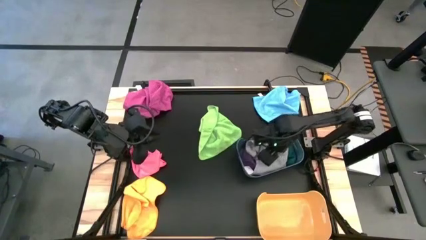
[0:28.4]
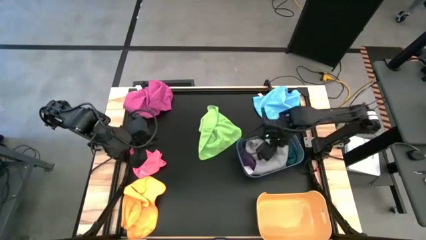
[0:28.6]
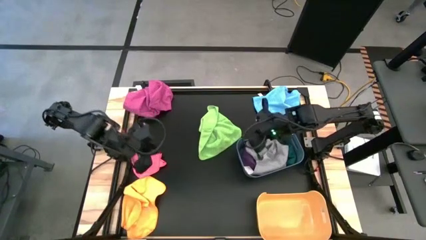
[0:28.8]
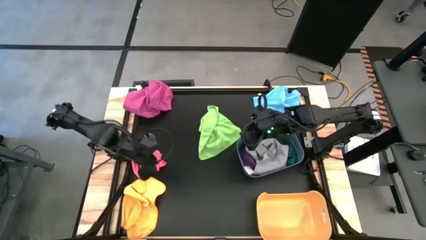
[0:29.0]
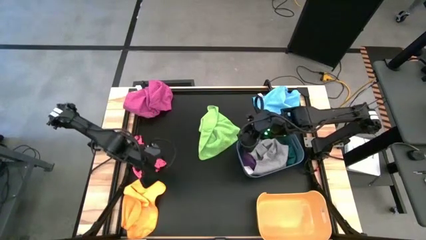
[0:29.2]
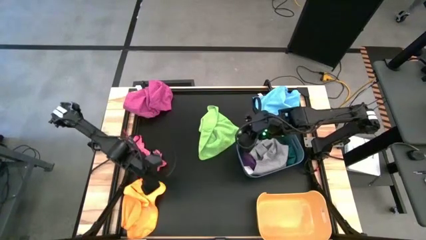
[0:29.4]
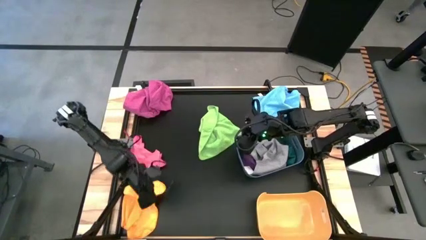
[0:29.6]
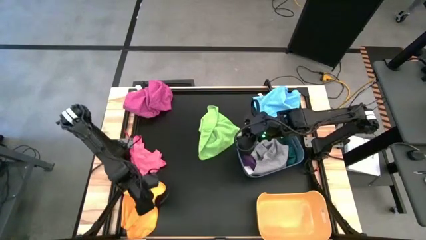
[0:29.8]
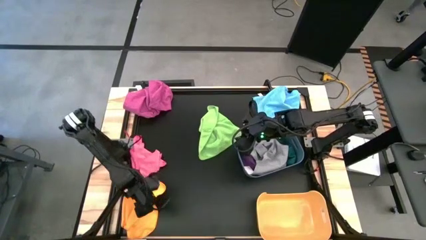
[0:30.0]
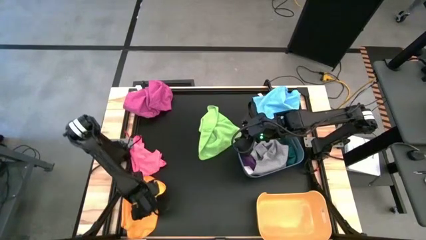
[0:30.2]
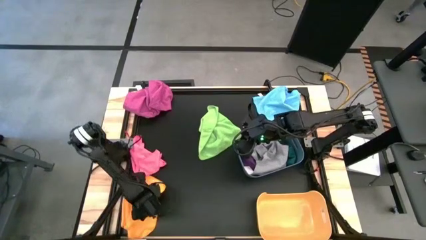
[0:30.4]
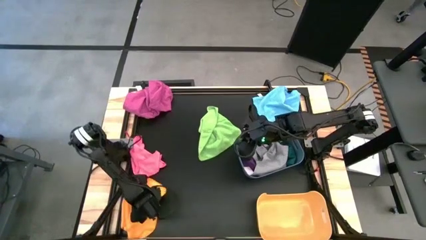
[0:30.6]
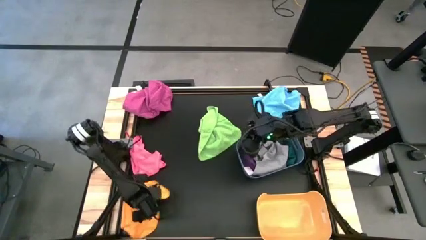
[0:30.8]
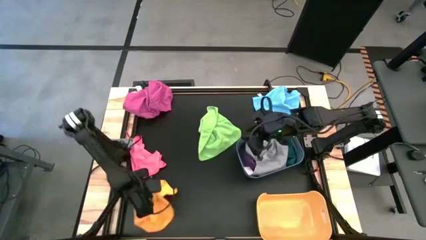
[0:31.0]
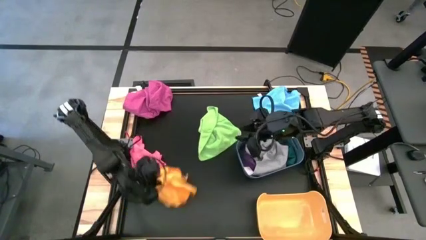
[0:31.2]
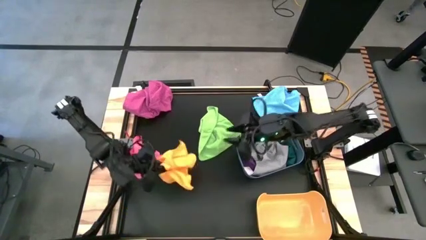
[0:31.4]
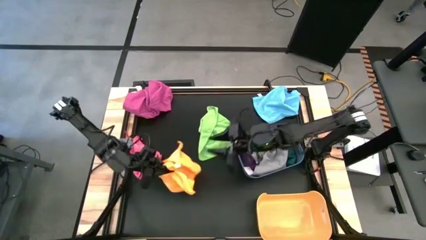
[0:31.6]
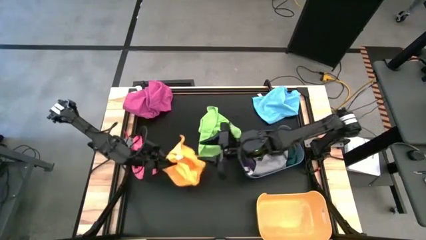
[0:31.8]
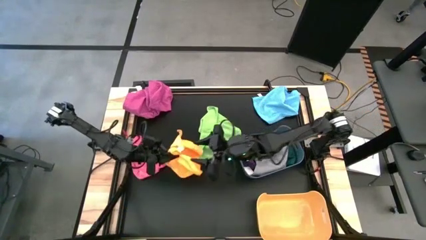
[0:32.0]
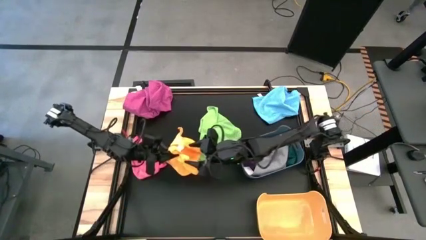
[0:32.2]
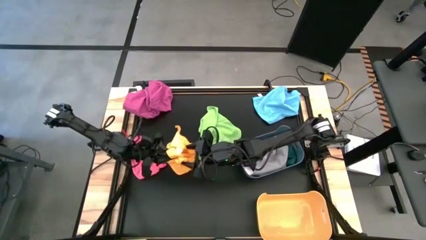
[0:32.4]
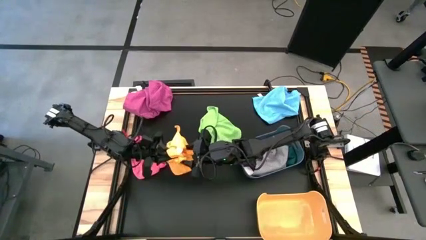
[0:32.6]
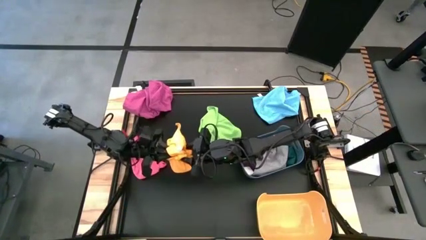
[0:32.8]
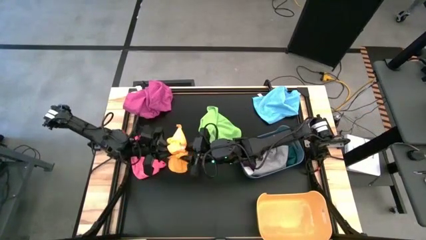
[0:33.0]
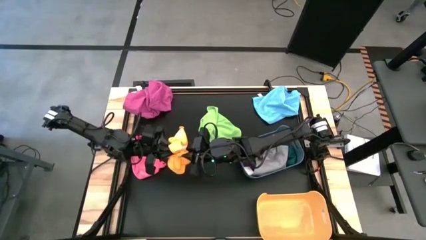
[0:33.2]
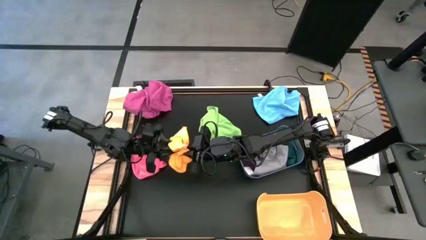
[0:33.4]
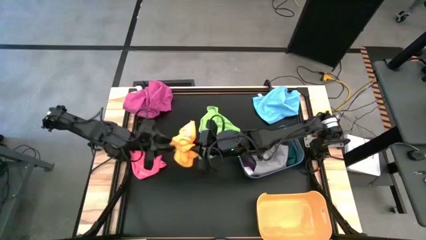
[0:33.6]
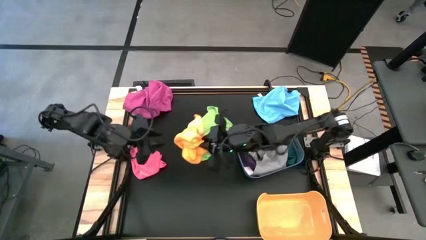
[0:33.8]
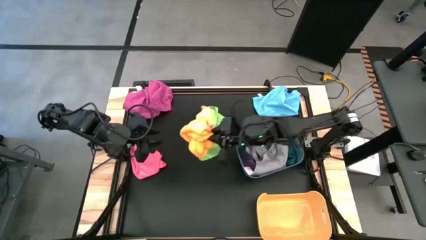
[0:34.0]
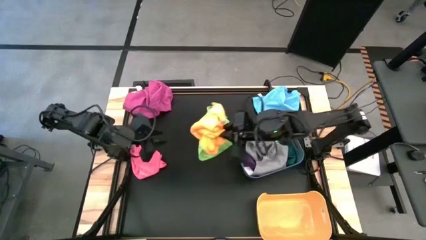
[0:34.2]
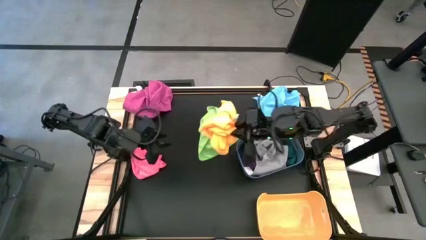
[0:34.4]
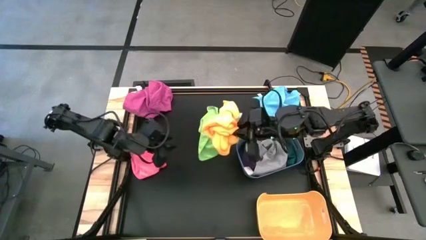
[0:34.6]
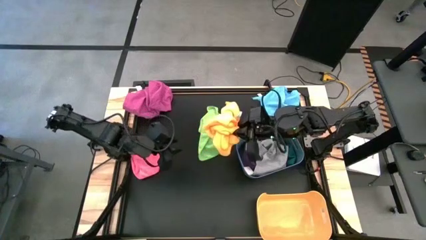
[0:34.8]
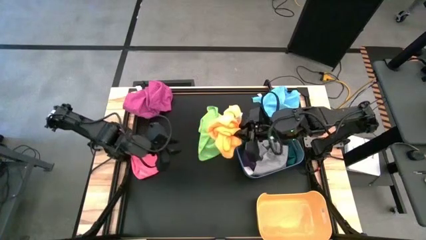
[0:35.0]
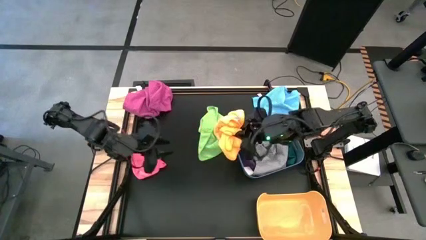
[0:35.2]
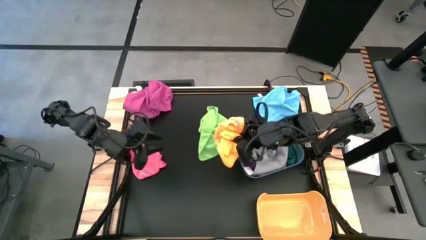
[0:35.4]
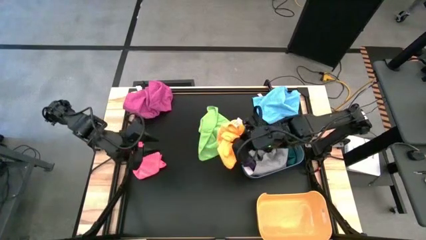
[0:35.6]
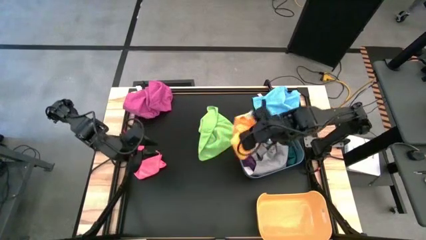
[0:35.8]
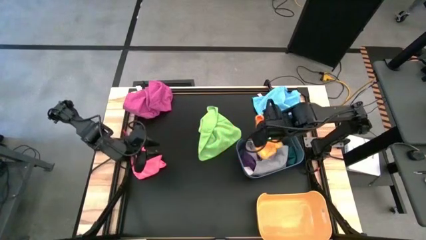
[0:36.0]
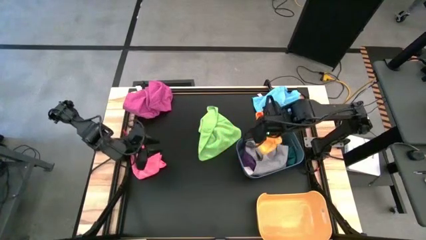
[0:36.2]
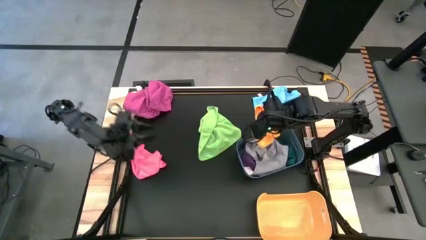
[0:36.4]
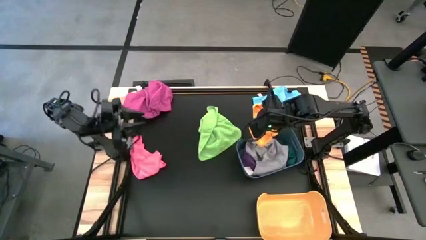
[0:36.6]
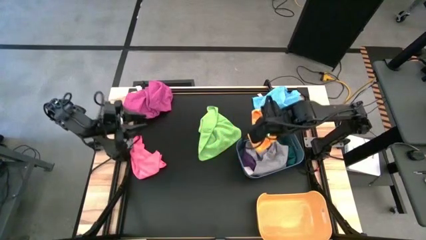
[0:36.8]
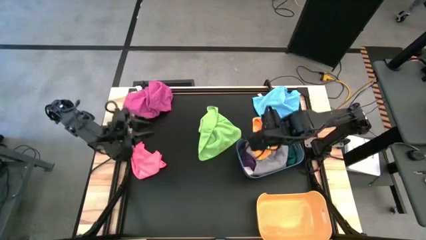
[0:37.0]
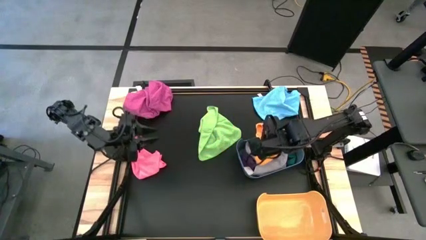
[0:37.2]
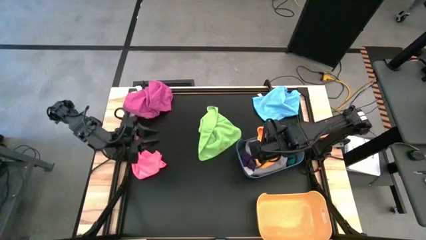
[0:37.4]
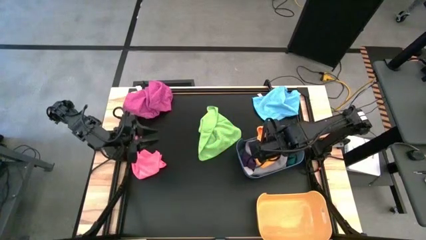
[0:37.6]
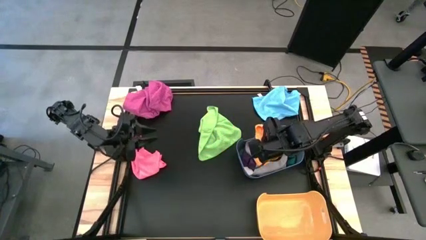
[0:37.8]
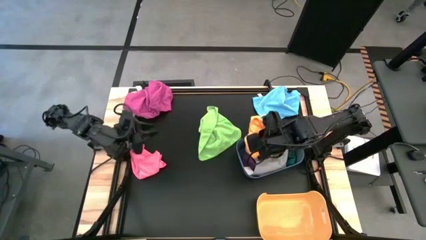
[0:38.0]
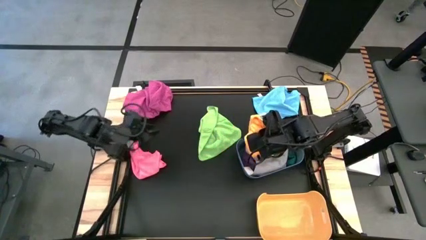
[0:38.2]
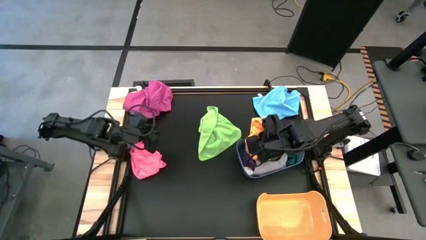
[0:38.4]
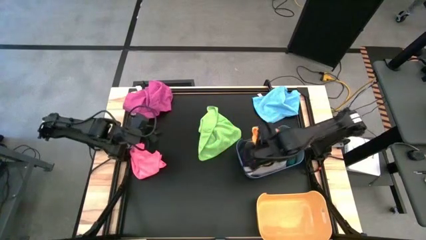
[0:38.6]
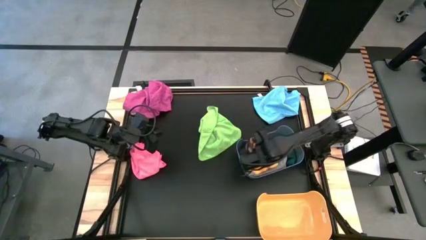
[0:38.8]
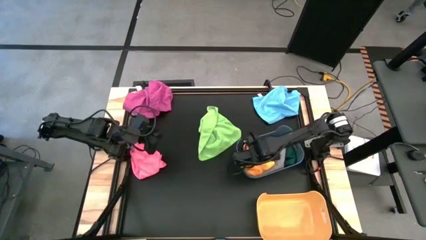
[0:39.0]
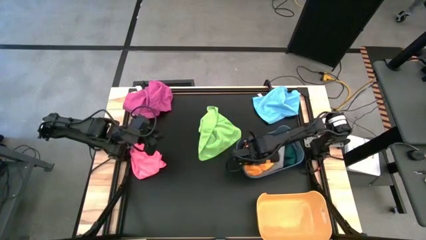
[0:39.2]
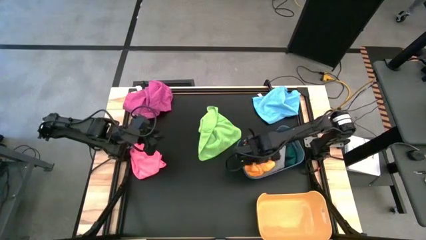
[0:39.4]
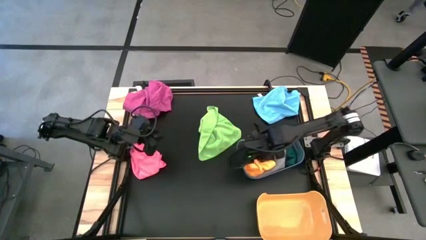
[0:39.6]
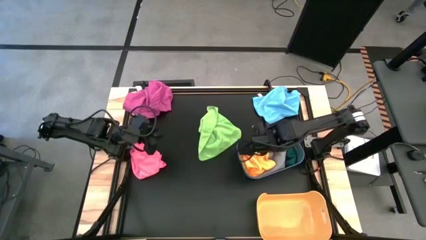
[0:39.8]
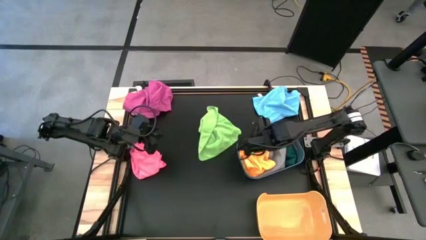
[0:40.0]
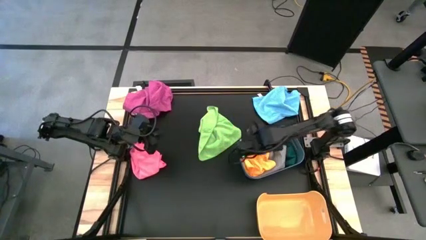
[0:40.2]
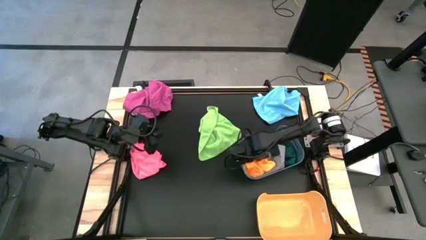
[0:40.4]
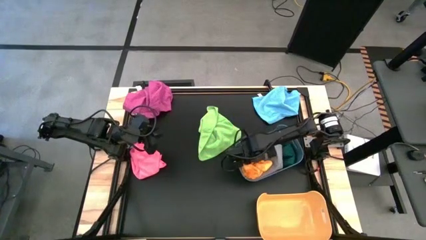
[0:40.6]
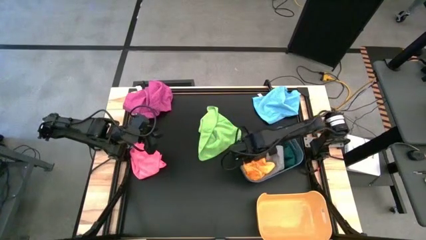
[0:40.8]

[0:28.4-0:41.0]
Task: Sort towels by color in basket
Put the orange towel into the blue bin

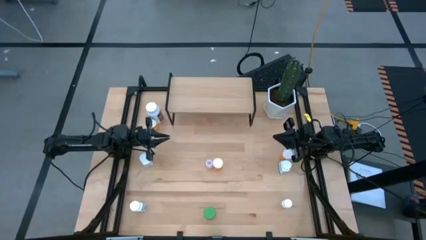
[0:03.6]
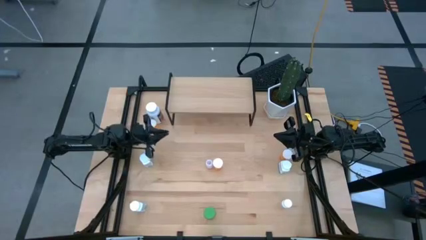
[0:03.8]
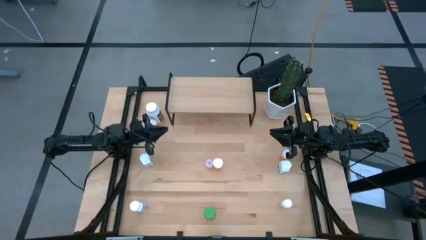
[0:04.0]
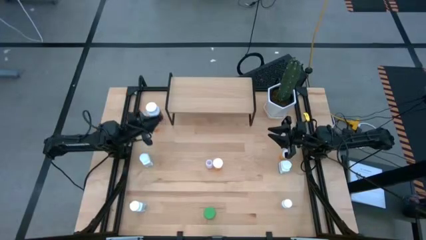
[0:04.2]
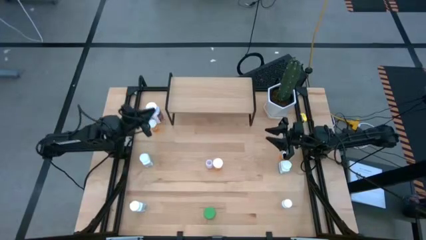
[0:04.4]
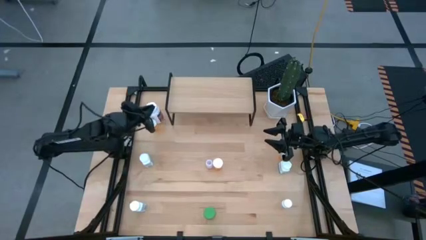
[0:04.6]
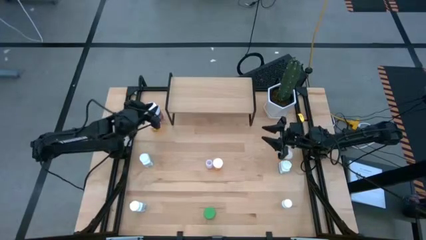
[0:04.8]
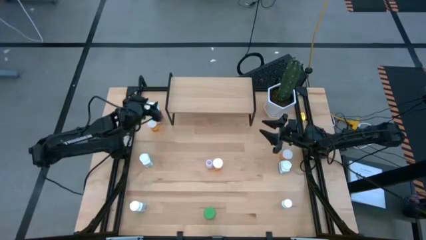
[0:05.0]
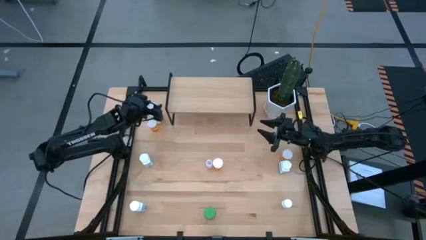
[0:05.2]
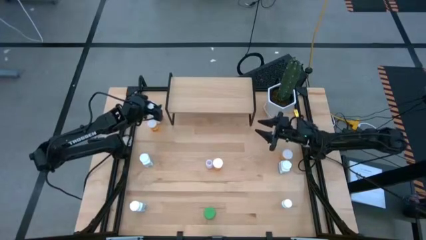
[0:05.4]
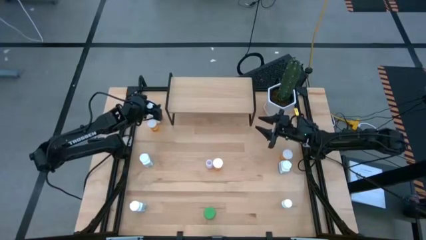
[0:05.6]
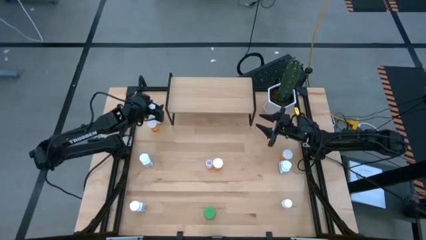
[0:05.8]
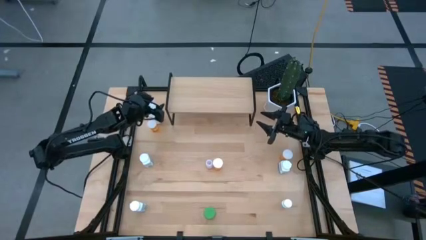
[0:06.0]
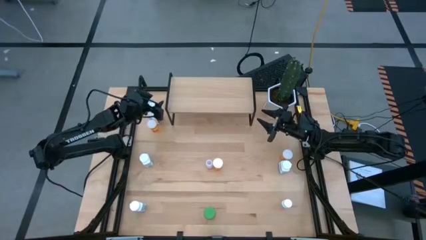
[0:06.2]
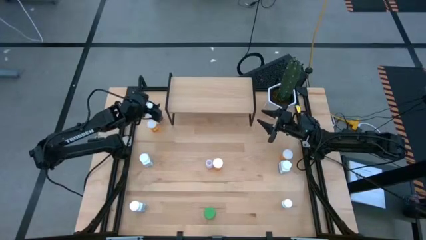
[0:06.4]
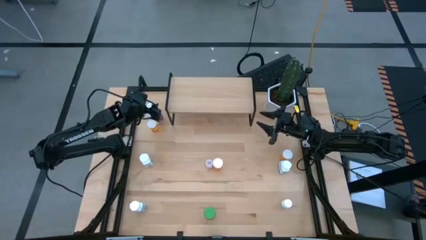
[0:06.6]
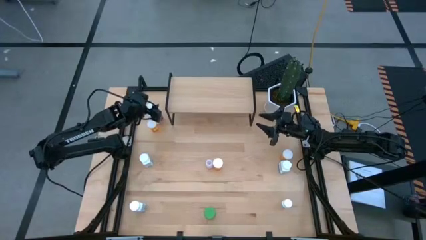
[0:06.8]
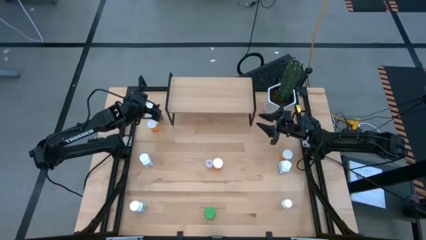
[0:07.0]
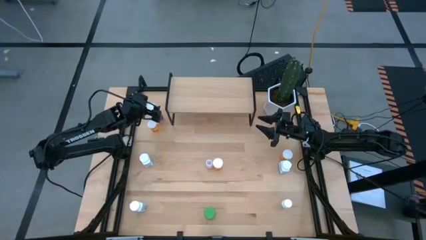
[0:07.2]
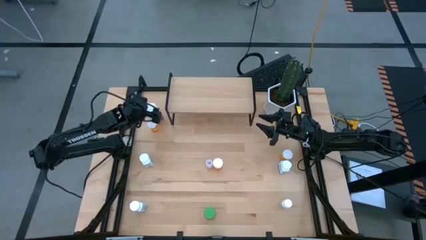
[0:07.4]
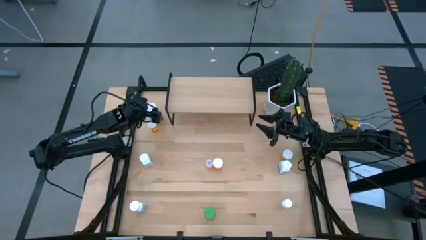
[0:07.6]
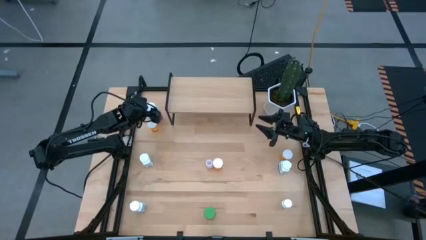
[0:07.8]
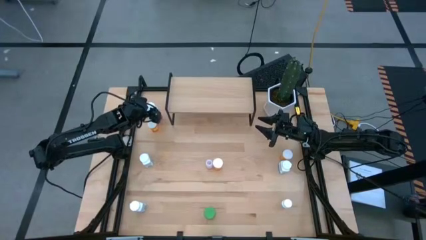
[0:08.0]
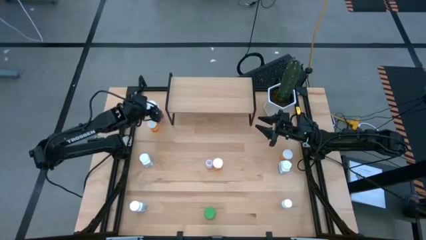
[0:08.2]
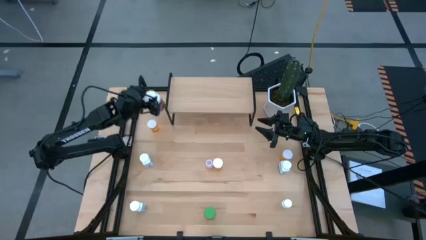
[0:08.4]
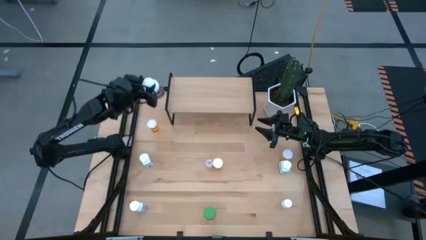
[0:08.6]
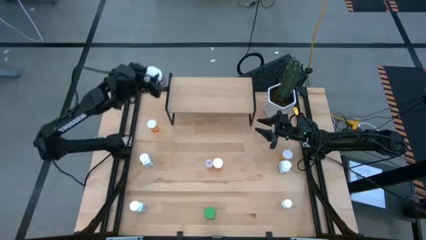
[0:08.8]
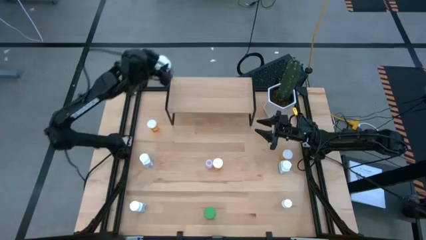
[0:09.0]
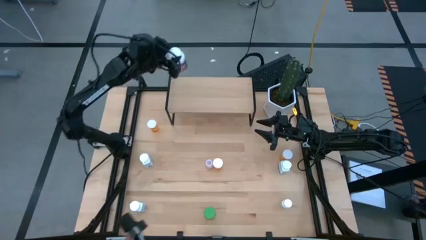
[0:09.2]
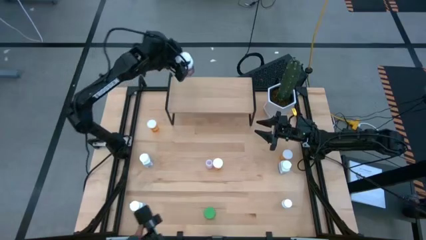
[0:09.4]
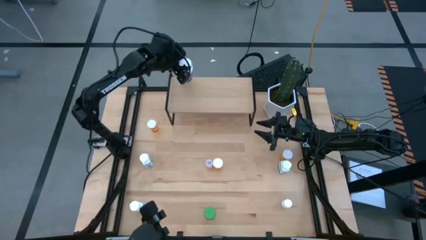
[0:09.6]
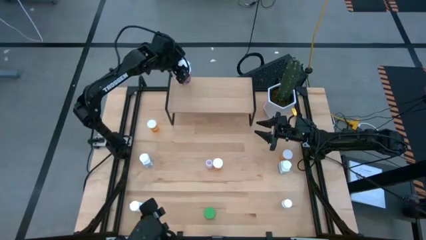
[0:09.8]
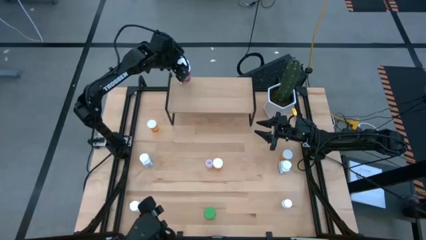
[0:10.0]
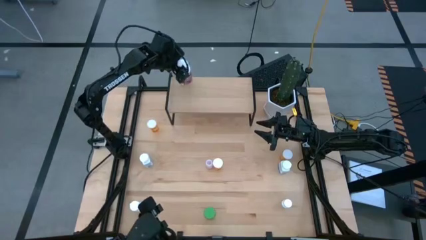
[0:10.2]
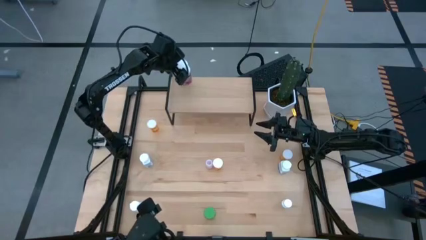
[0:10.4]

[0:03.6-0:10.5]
Task: Pick and place medicine bottles onto shelf by color
Put the white purple pill bottle on the shelf
